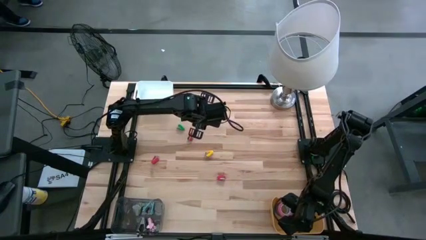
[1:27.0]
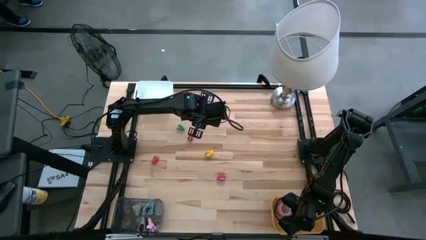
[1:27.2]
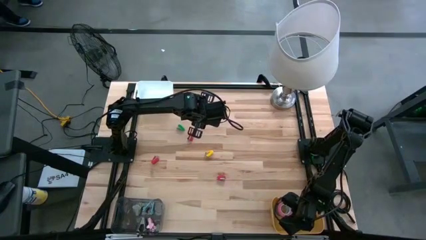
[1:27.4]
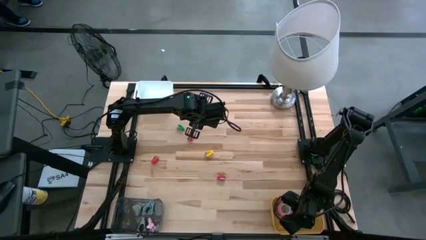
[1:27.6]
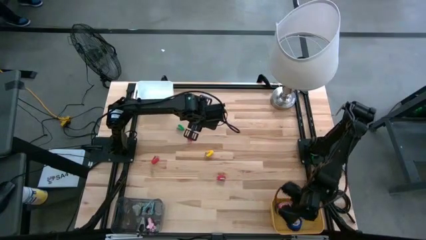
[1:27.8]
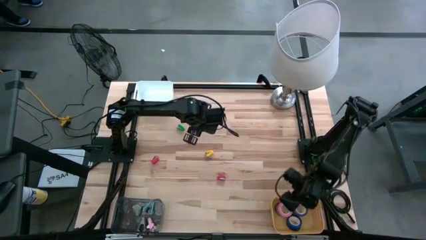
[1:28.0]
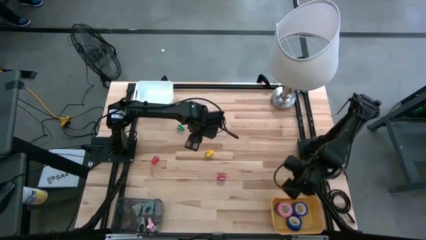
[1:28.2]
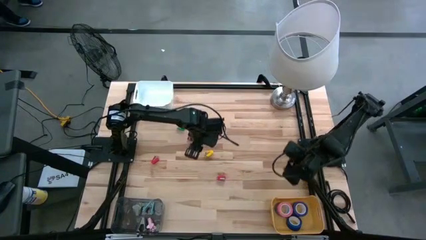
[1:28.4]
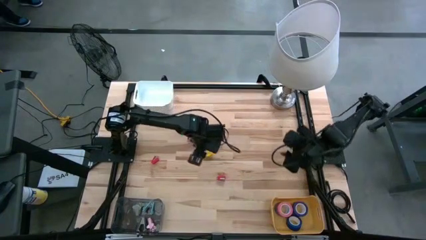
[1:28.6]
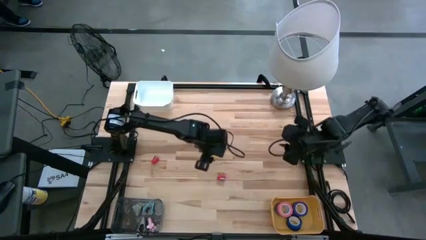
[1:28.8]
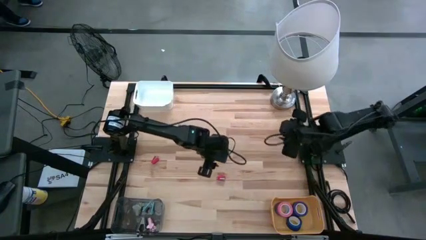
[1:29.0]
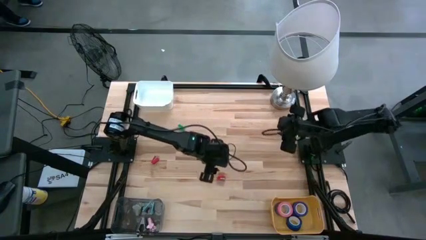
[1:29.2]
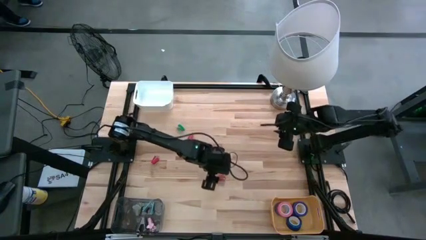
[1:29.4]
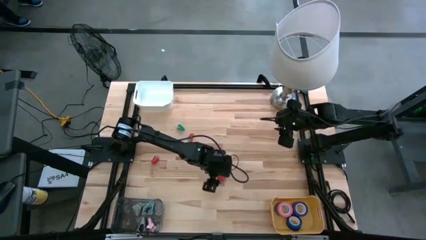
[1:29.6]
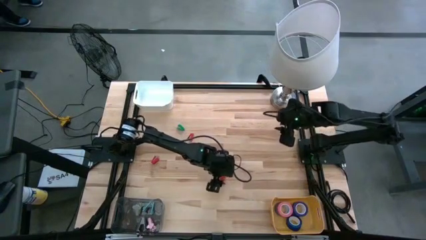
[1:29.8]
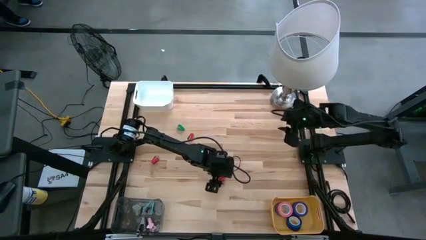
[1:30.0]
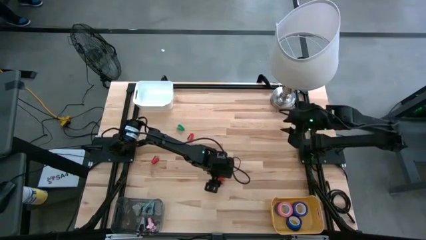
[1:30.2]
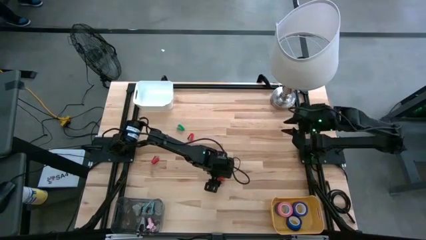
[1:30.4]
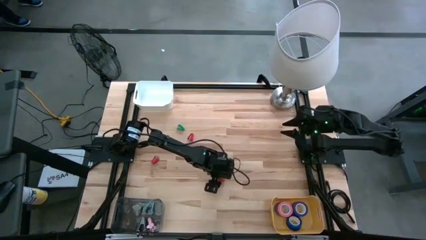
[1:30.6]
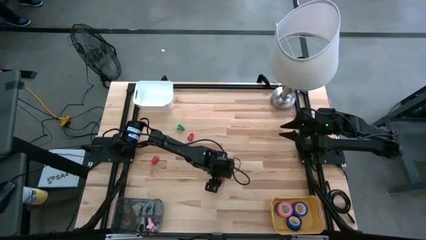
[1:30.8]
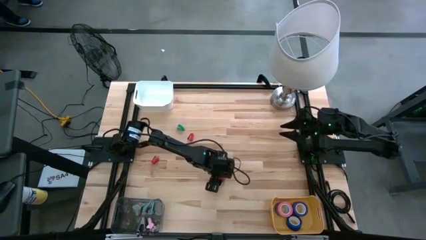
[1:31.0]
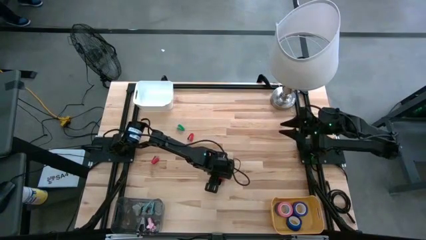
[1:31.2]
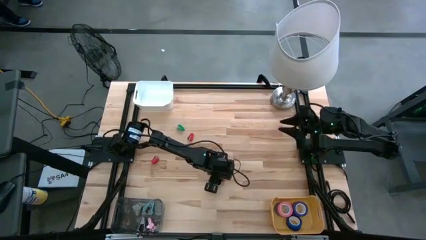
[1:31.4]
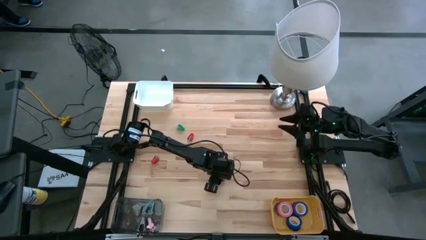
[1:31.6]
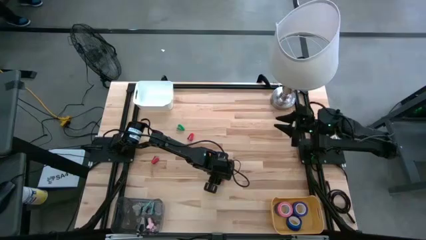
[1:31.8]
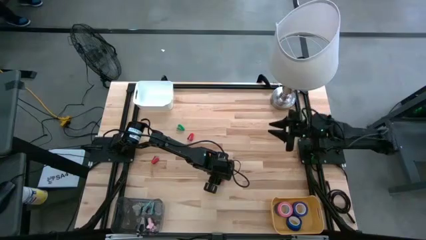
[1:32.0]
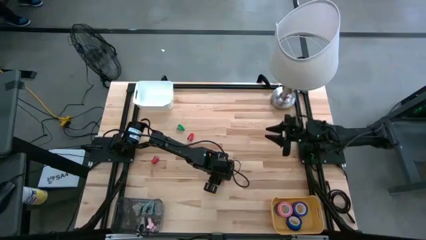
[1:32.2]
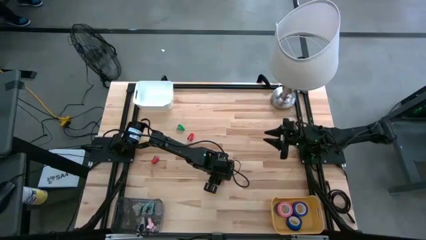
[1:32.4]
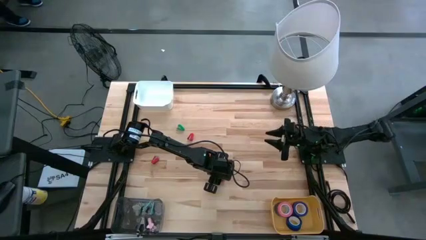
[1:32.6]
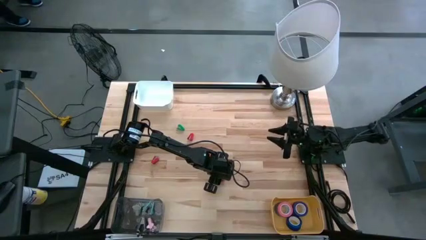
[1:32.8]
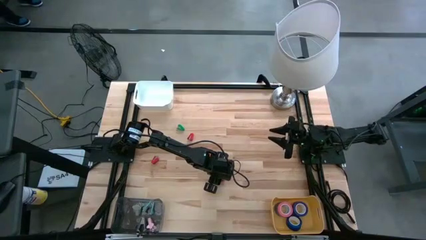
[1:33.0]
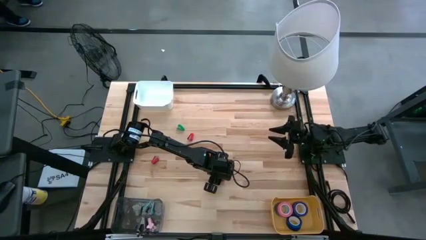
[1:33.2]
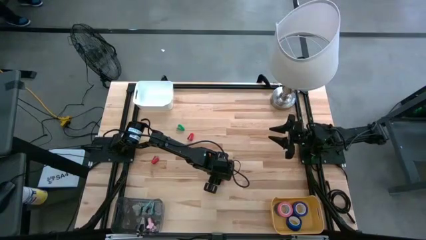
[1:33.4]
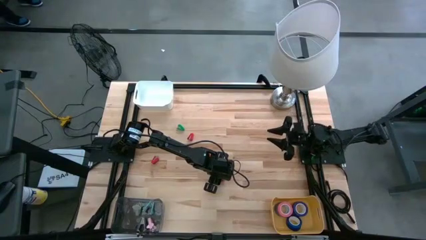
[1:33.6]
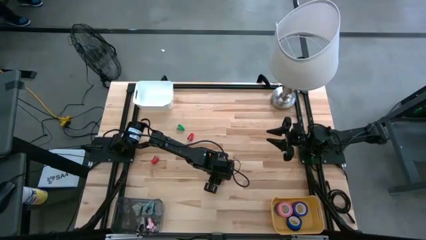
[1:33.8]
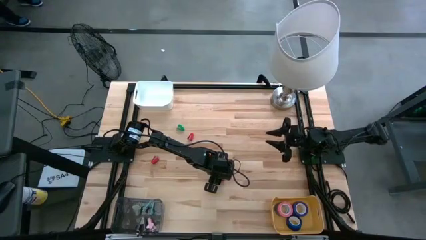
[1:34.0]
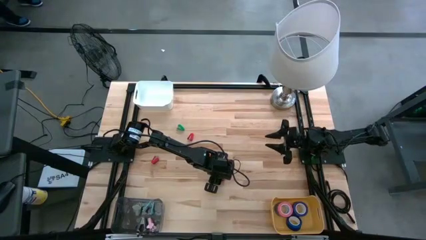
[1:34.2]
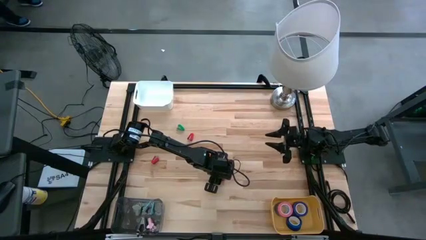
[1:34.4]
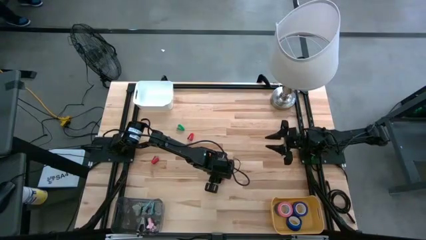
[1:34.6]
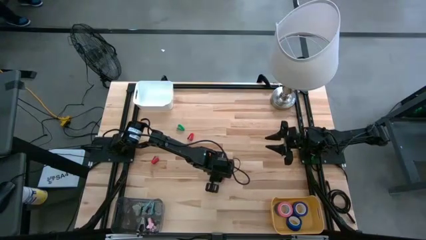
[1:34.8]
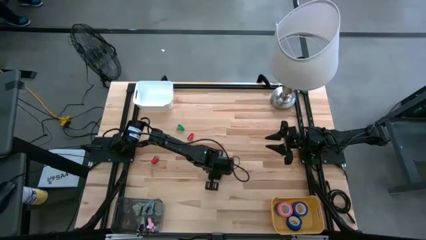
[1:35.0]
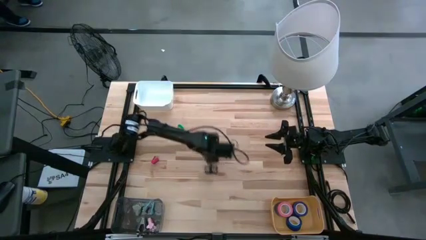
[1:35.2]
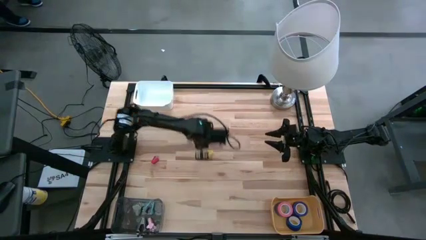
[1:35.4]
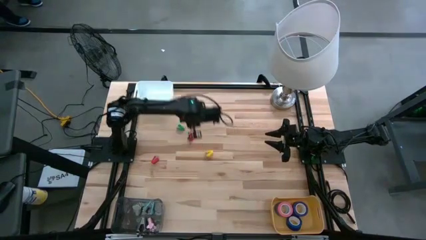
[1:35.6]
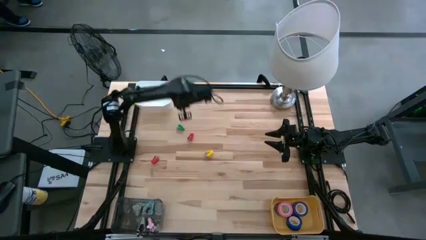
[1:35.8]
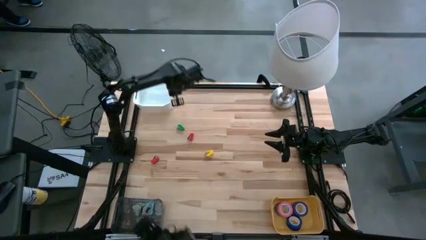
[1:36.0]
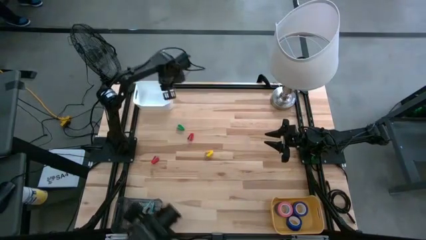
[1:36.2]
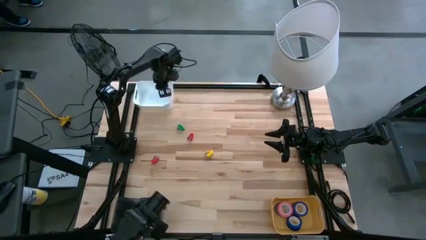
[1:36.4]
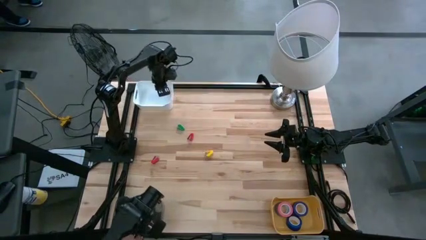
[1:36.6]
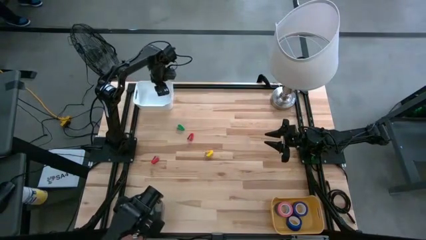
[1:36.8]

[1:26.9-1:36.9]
Task: Pick and place Stapler, Stapler remover, tape
Put the bottom red stapler into the white bin

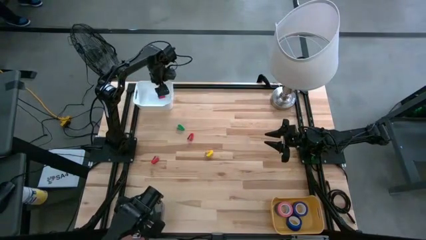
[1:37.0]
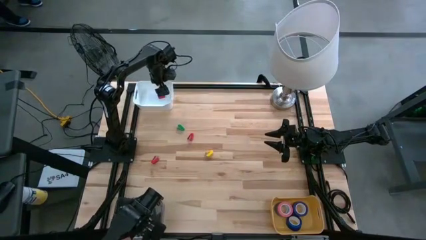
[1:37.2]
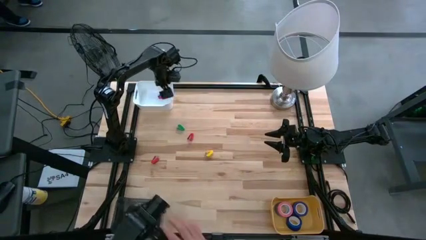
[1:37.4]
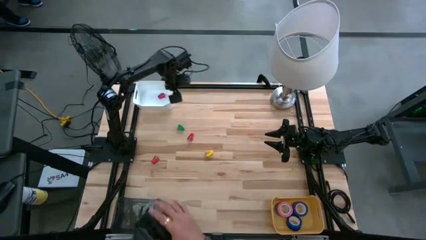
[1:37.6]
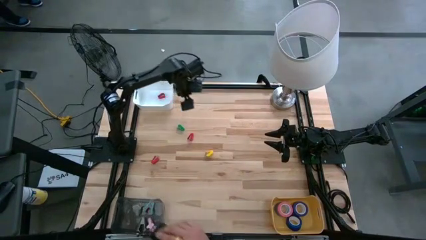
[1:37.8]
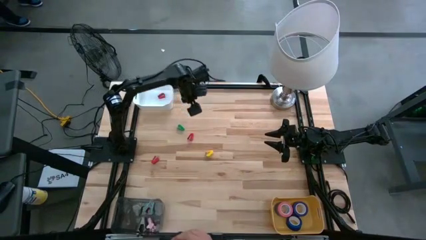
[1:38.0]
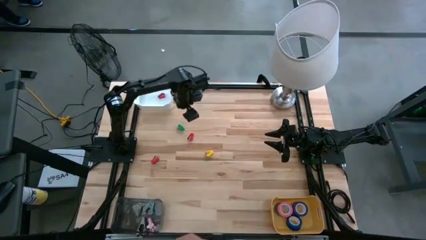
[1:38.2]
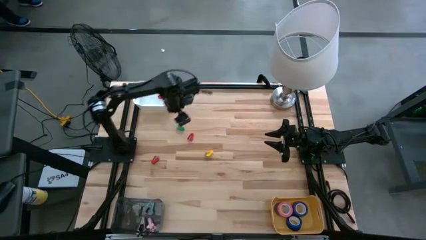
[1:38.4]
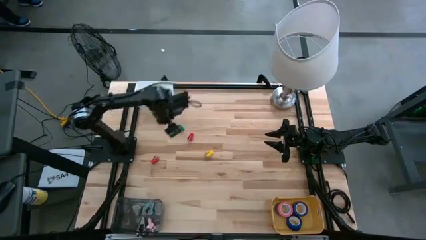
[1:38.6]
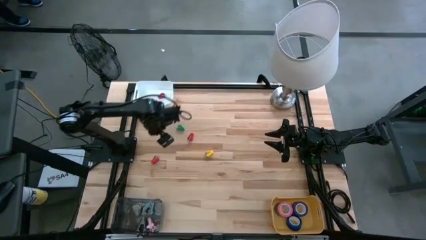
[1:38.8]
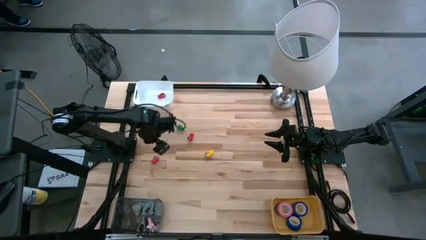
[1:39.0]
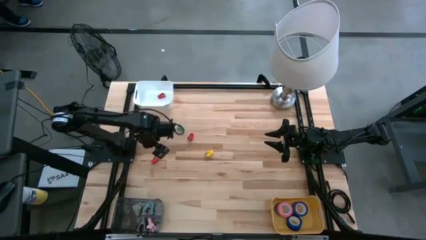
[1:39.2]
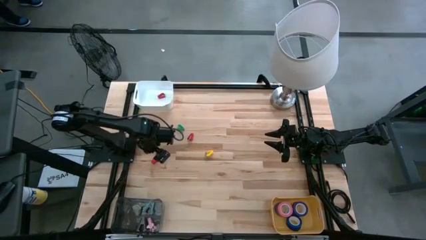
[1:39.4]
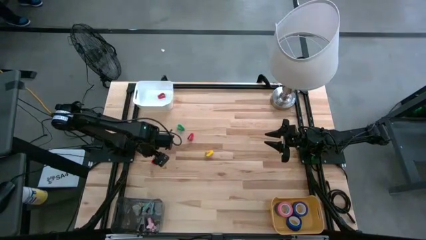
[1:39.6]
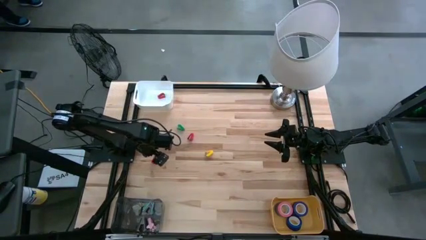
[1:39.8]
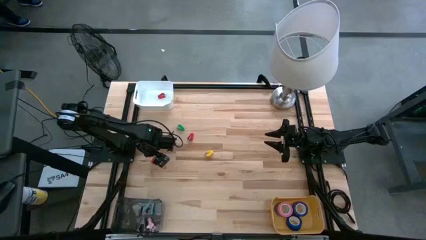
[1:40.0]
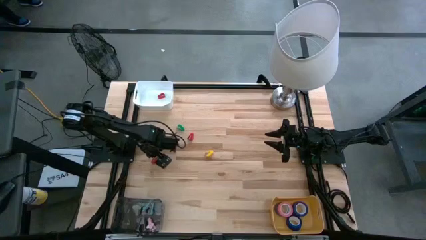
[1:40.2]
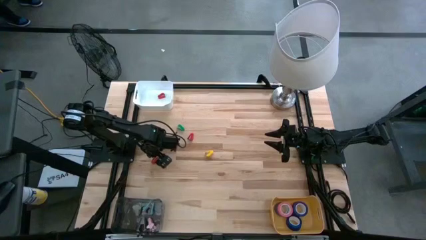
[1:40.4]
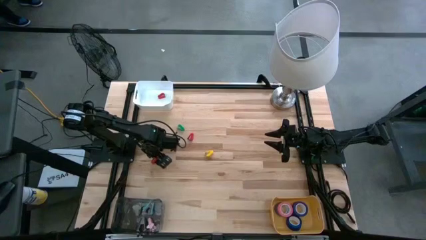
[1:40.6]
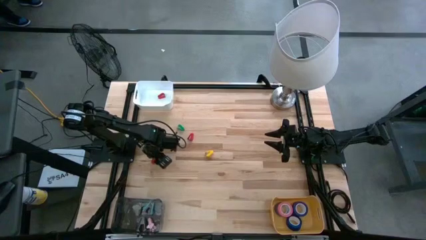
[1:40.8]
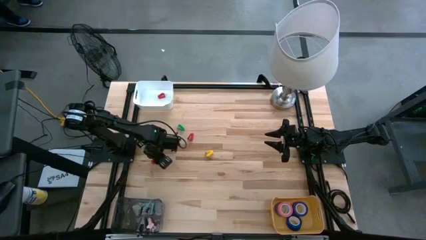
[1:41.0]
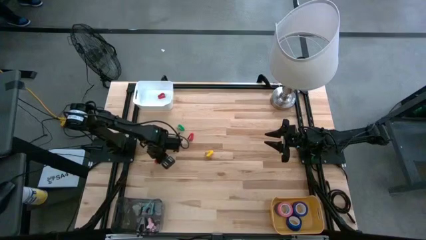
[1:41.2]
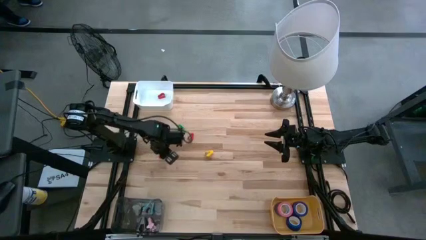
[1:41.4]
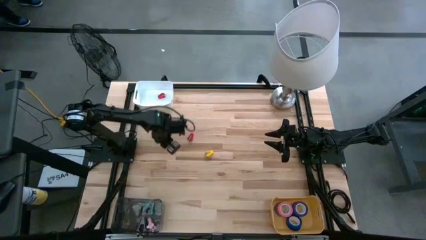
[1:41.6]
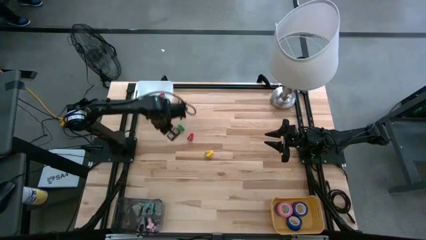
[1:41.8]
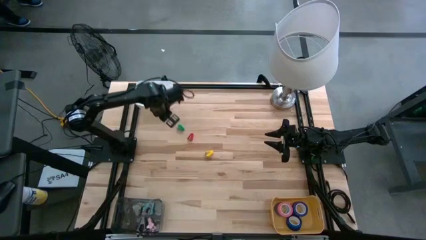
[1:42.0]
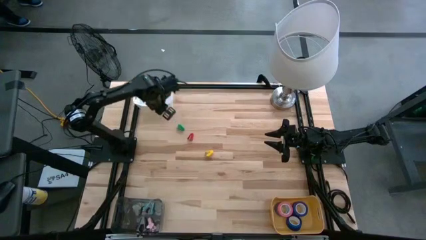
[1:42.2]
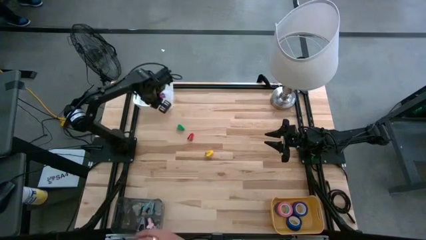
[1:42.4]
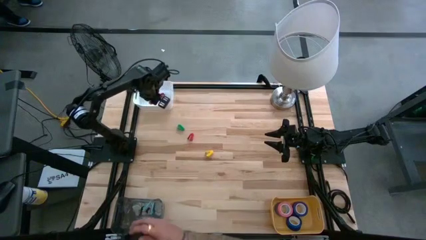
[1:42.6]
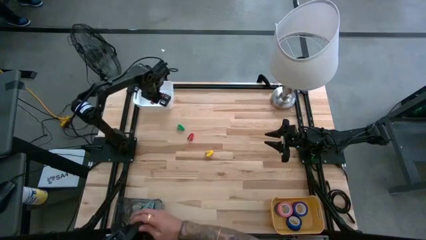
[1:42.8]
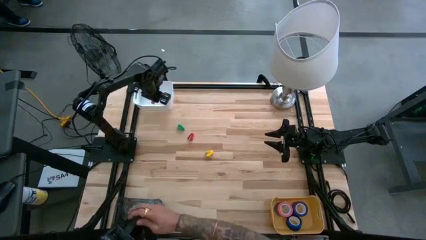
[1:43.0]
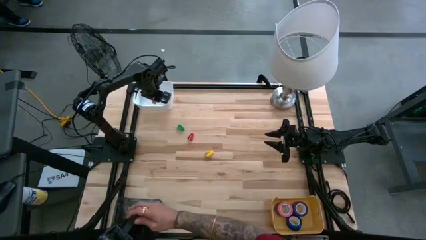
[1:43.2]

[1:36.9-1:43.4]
Put the bottom red stapler into the white bin
